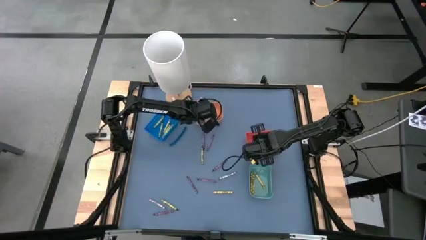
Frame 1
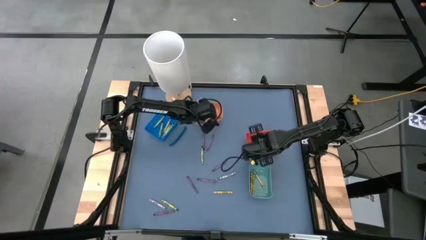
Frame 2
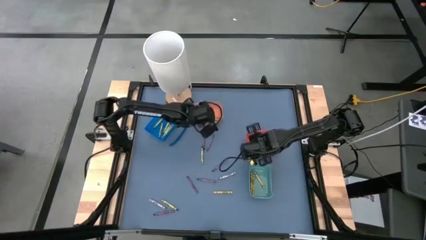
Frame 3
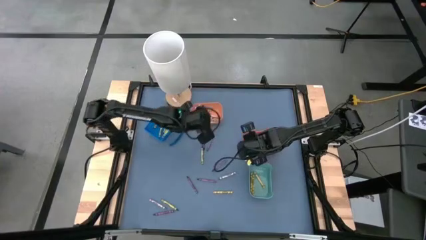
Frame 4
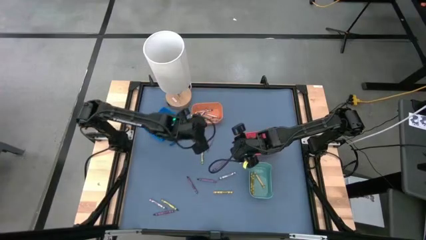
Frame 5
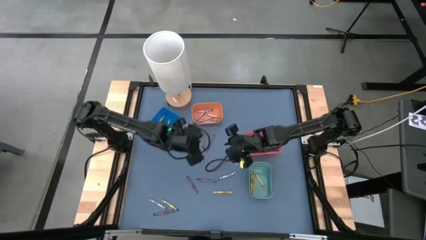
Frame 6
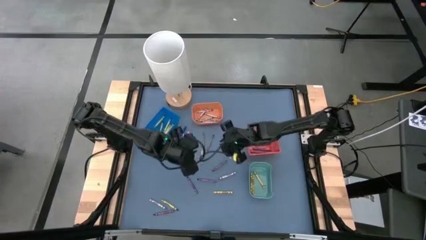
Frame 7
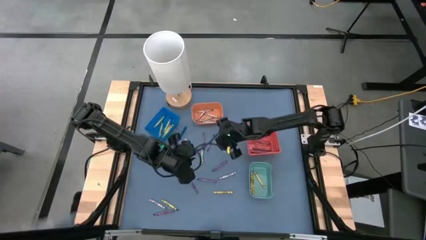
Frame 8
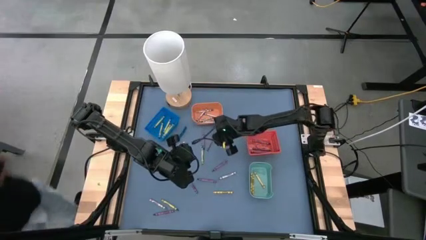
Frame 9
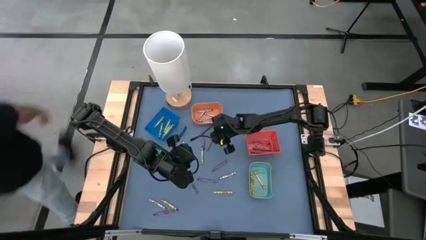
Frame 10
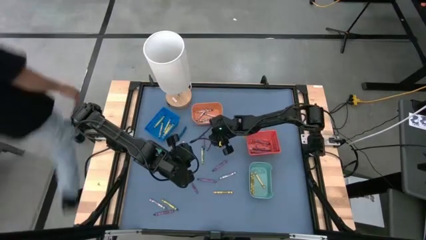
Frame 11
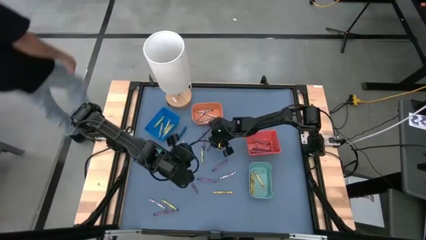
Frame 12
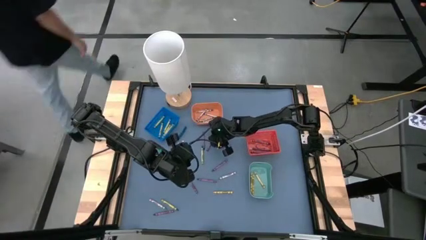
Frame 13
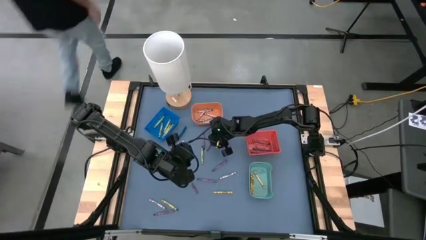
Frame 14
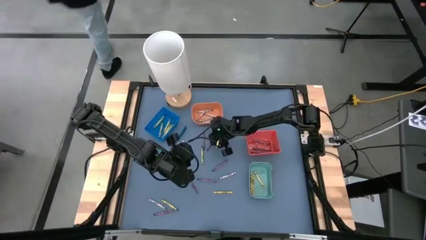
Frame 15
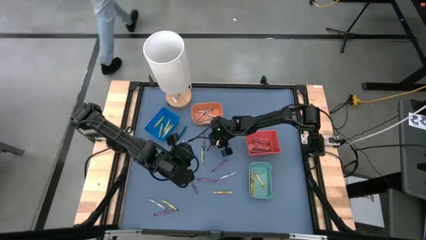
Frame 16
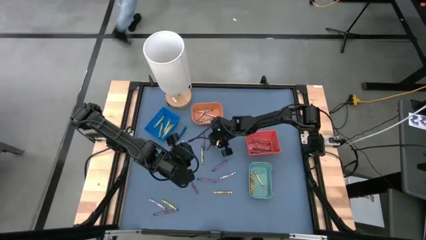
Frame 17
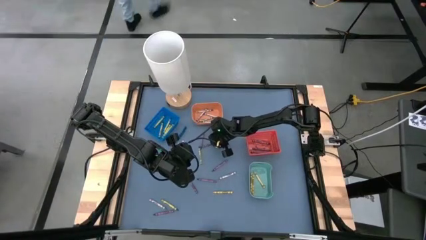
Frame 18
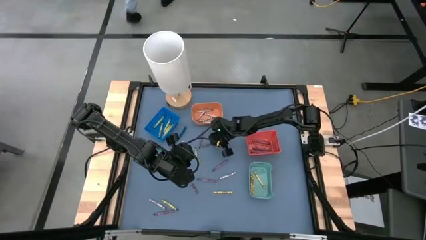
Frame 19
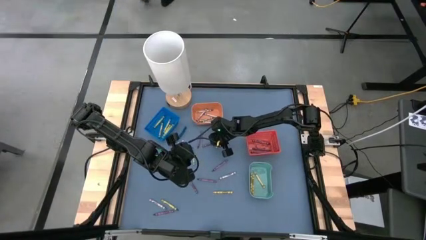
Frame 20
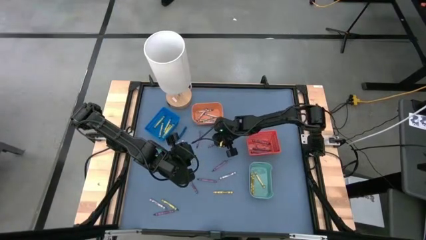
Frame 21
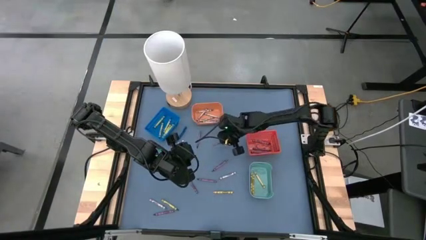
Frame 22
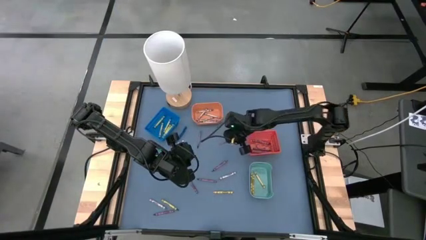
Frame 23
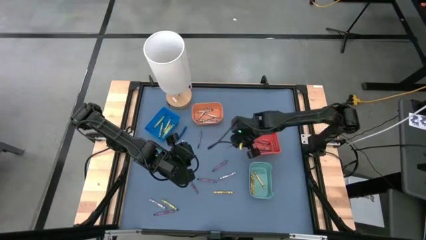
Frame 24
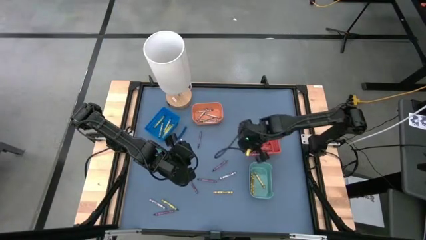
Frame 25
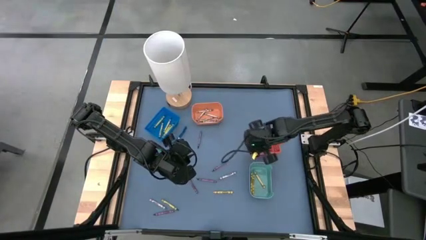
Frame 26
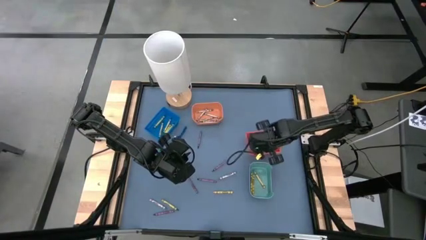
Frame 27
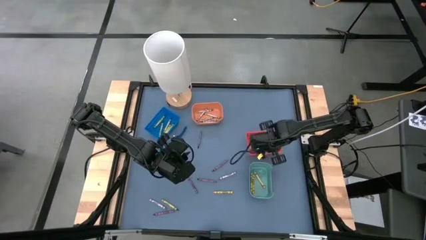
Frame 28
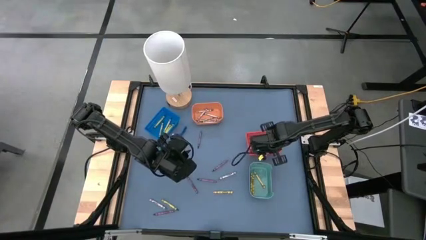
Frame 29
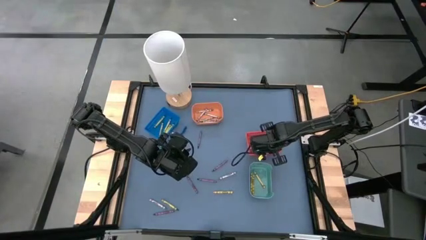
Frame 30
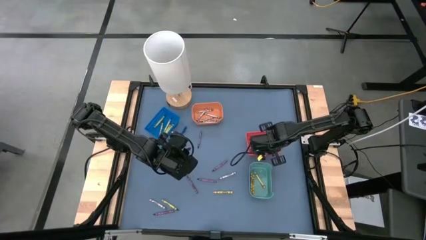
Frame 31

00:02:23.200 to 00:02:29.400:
Task: Sort crayons
Put the violet crayon into the red bin

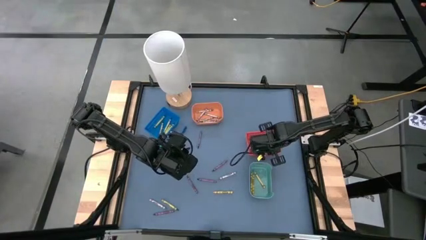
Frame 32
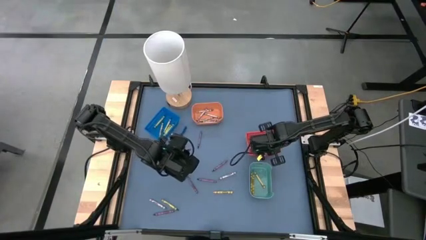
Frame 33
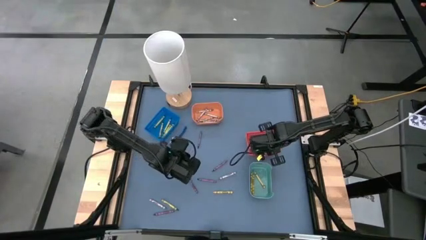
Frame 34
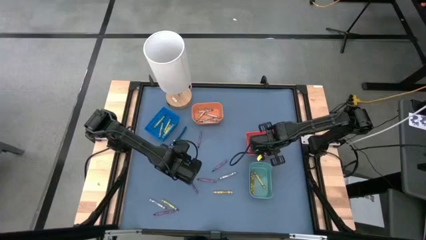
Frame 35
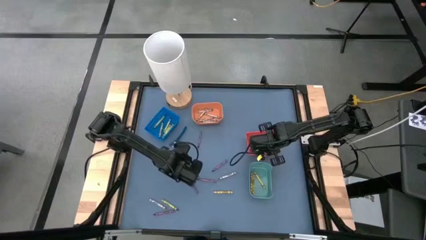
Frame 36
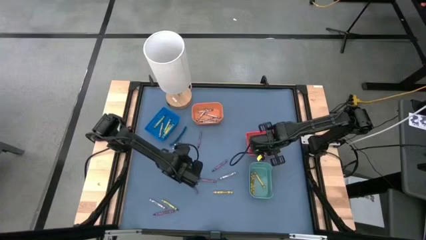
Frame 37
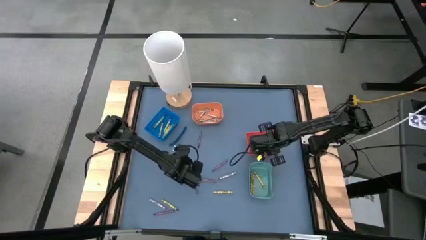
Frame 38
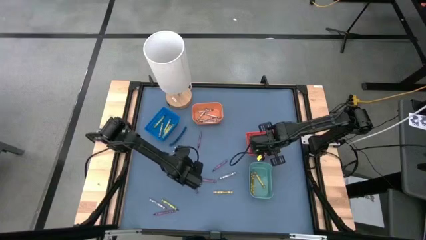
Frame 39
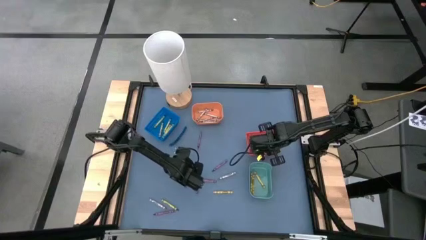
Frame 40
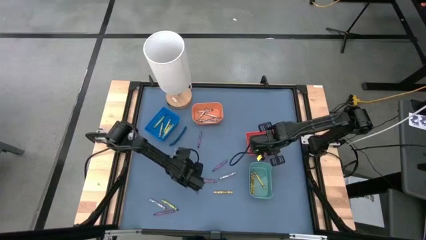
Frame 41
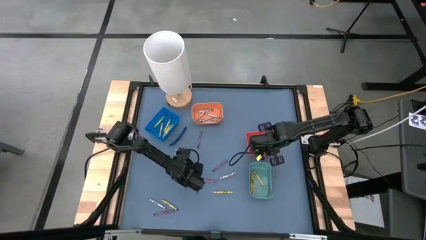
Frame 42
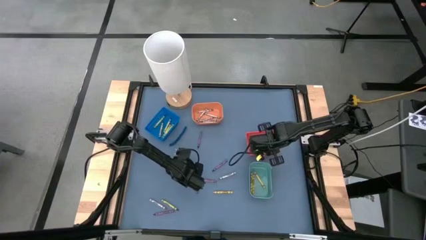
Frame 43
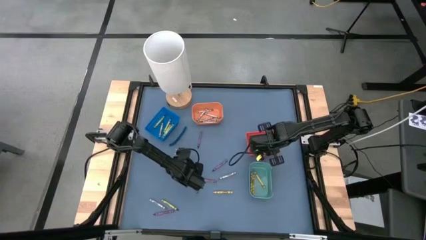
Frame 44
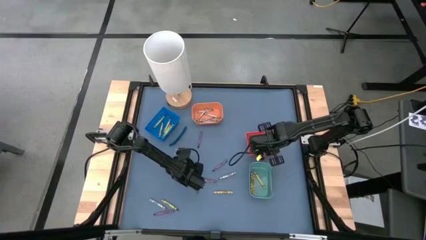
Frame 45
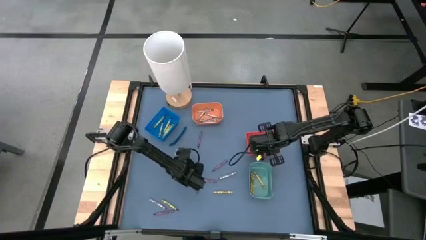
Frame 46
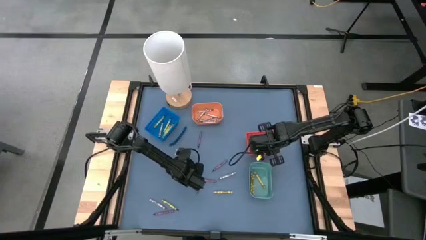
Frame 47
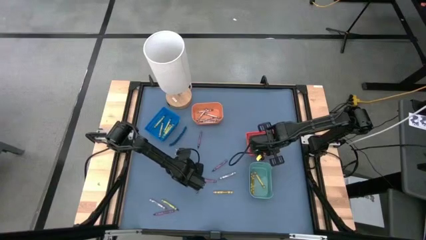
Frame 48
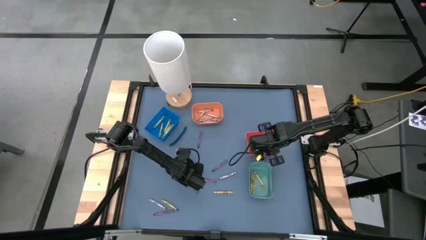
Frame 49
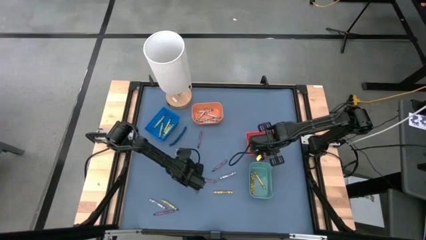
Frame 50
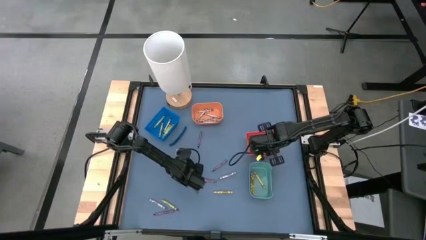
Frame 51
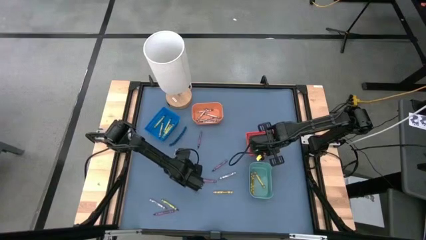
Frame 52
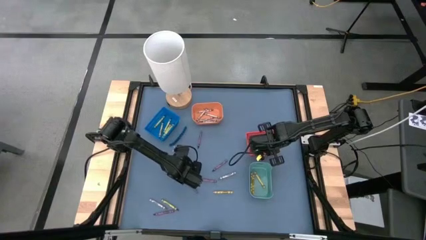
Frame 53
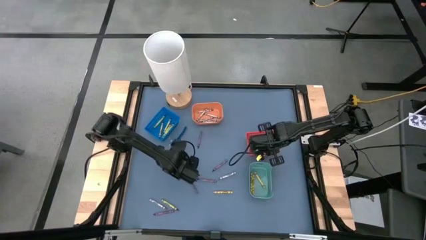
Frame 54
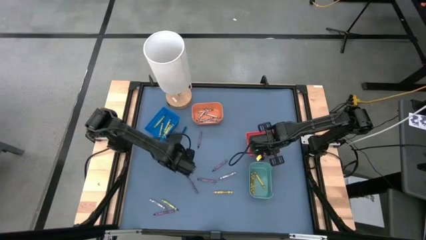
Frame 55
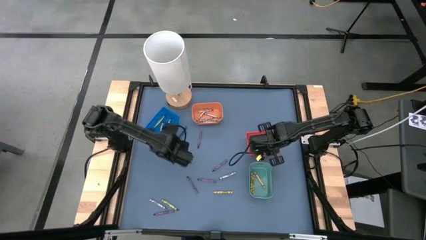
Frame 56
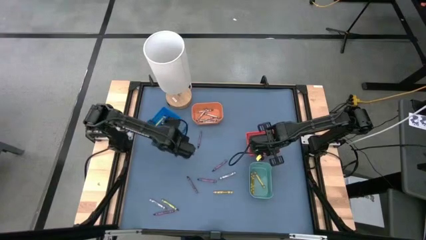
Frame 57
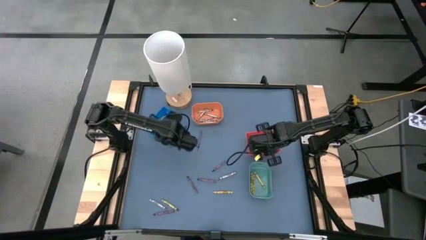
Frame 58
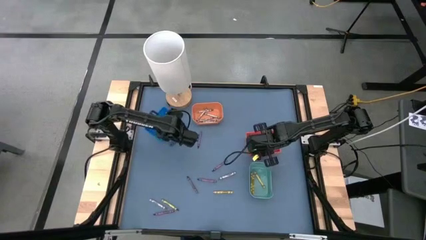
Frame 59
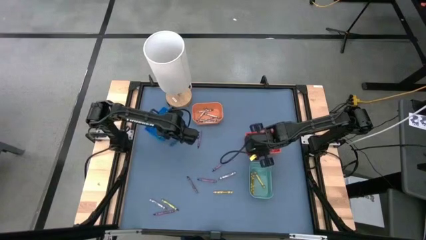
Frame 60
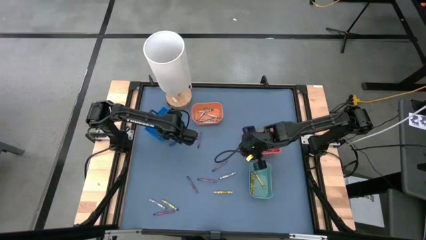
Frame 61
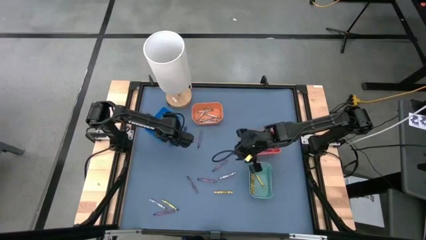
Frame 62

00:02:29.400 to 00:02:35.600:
Put the green crayon into the dark blue bin

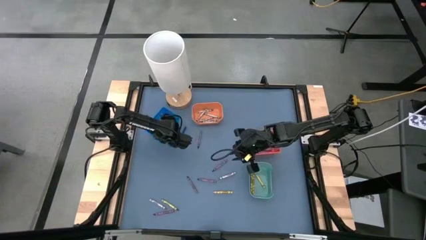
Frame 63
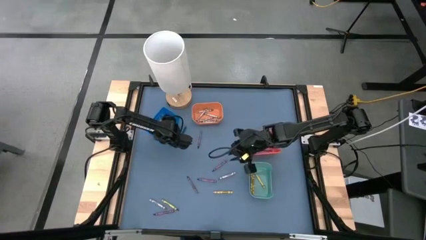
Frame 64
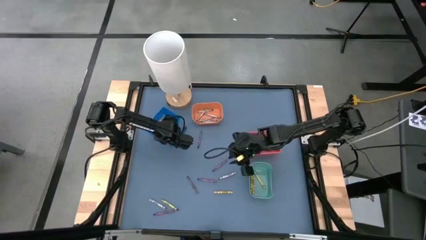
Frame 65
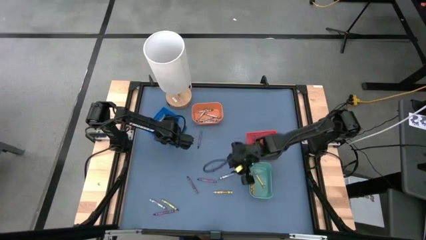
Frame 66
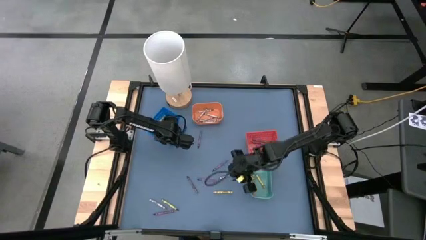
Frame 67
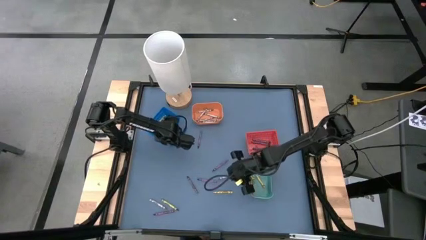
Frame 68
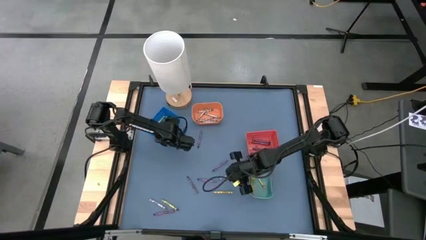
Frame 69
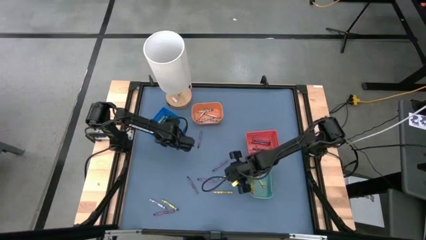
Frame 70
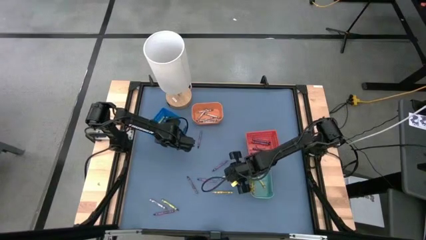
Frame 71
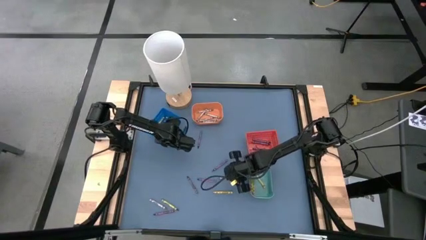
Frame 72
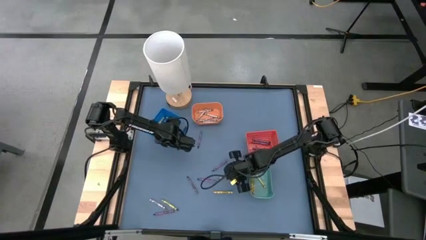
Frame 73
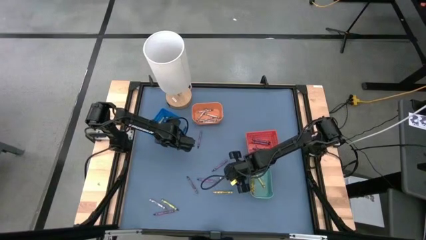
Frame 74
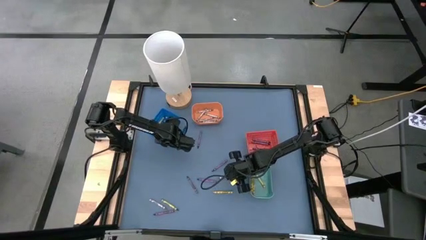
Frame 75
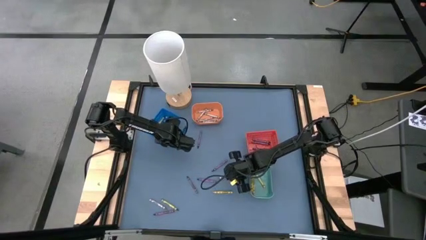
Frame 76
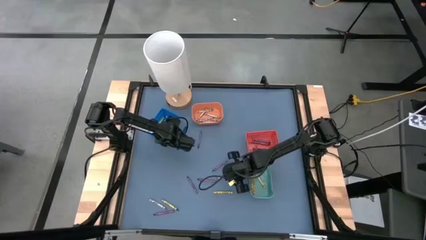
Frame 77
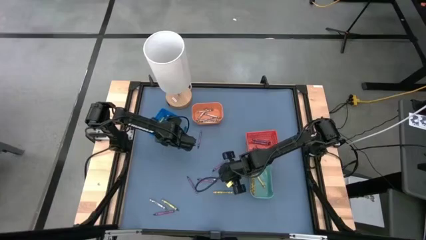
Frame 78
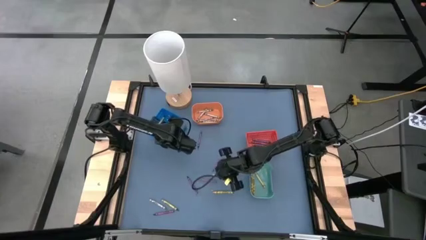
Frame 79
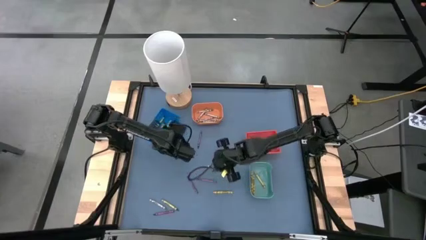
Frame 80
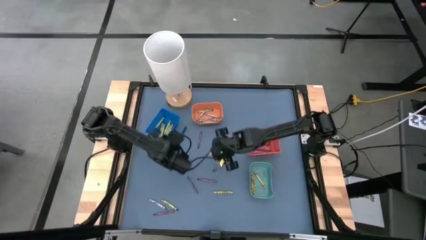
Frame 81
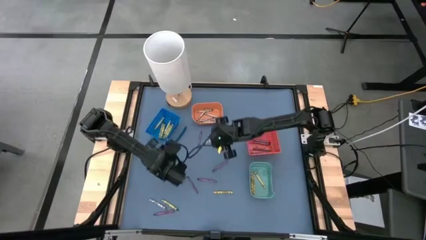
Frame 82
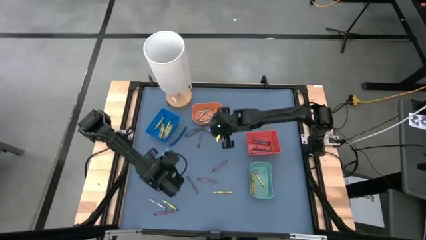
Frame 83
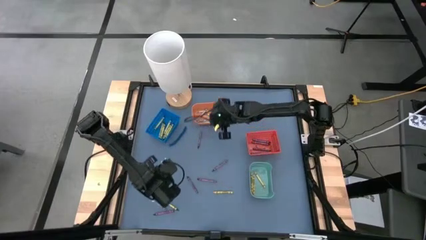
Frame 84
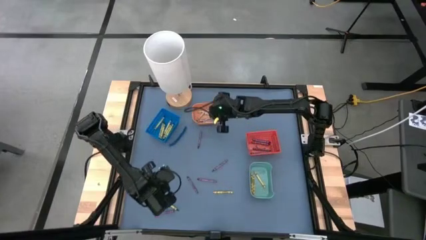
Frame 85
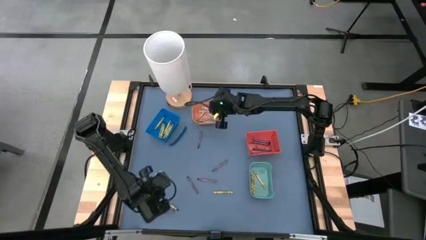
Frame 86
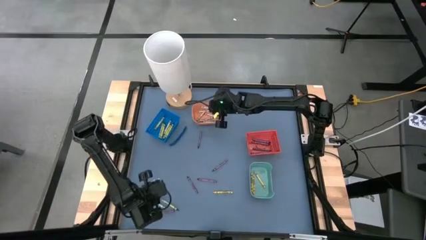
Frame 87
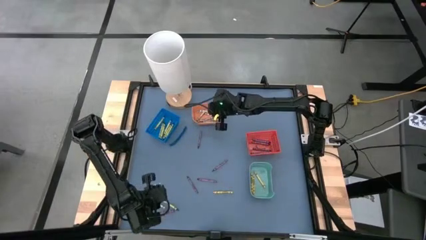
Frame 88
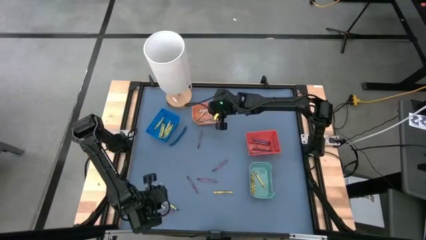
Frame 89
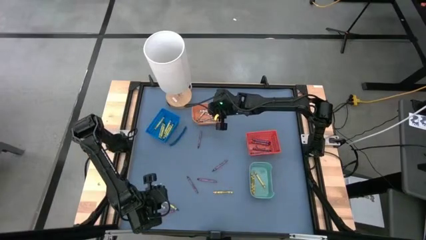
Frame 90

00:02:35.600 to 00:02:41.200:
Put the gray crayon into the orange bin
